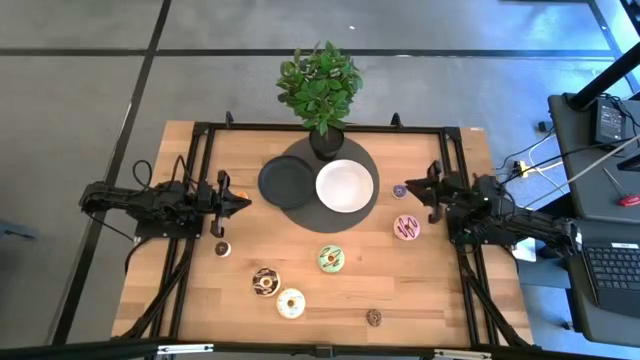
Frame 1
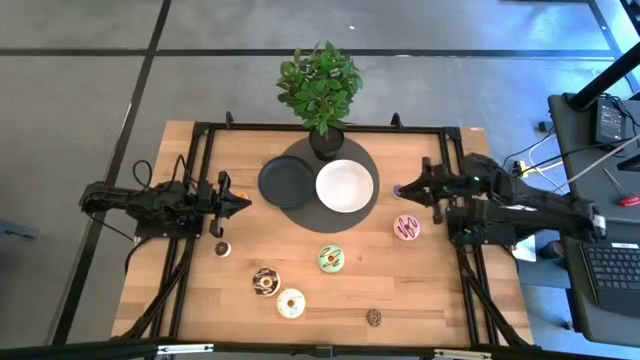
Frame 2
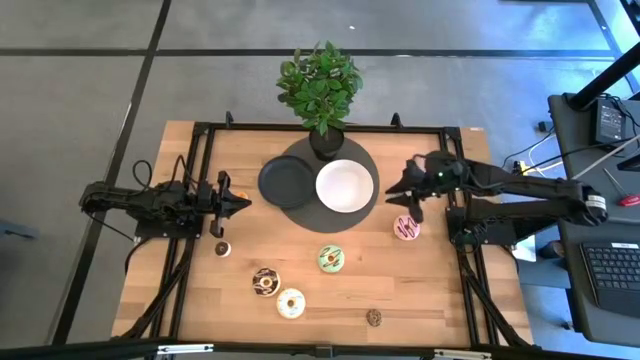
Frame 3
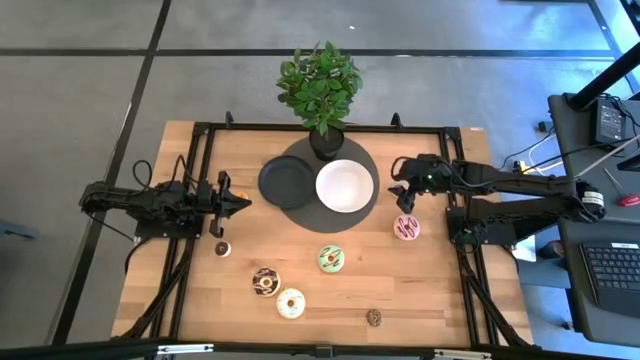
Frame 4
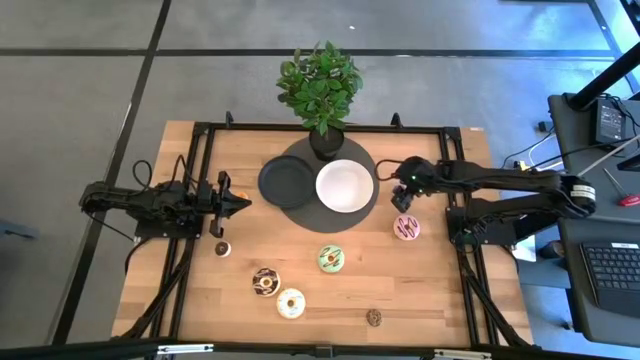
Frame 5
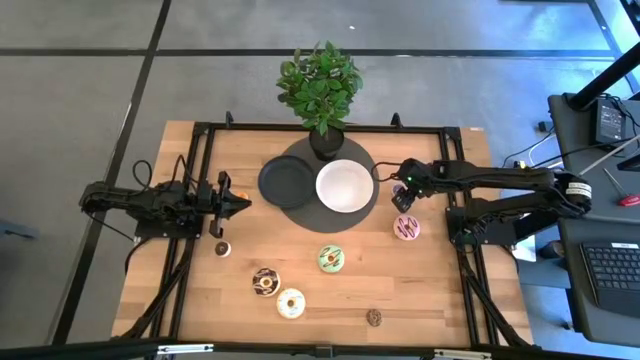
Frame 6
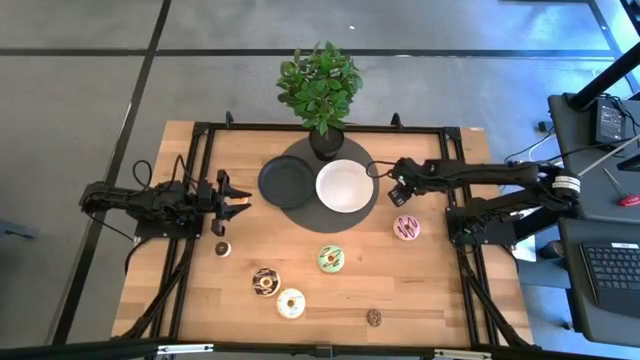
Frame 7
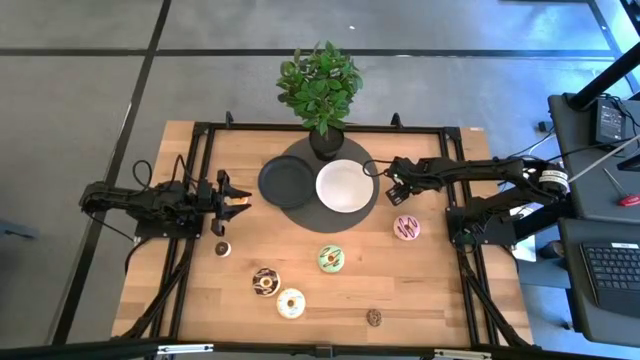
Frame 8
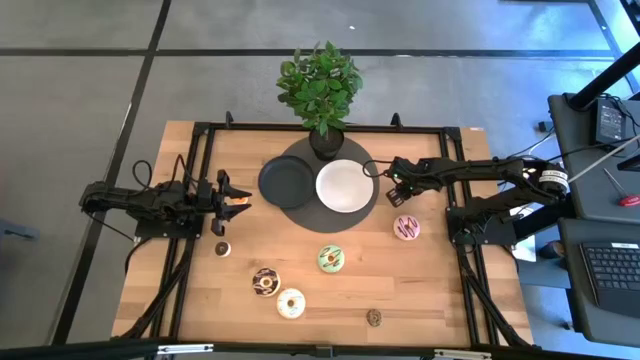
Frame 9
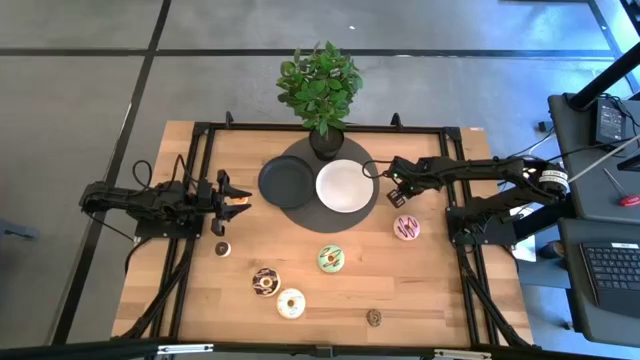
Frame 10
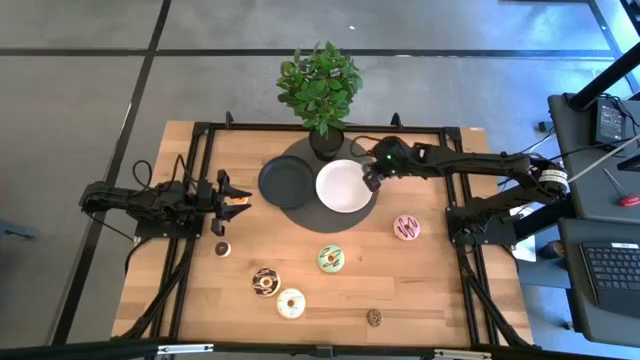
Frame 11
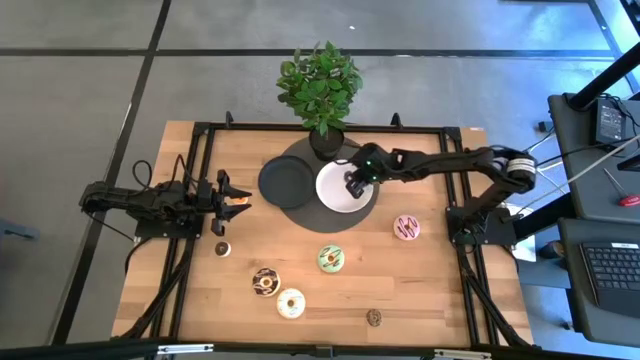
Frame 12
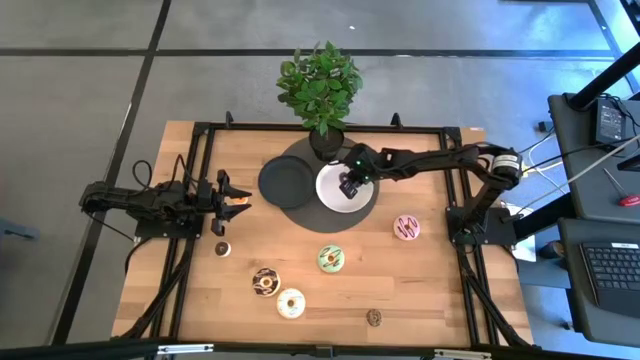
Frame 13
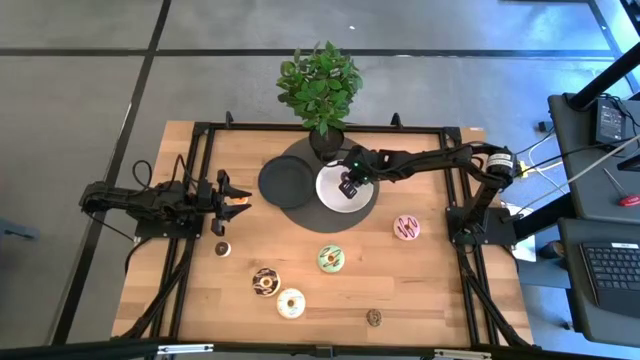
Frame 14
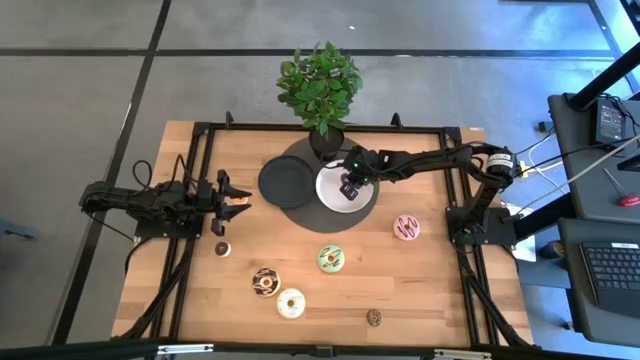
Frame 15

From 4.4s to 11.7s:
Task: Pick & Place donuts
Put the small blue donut on the white plate

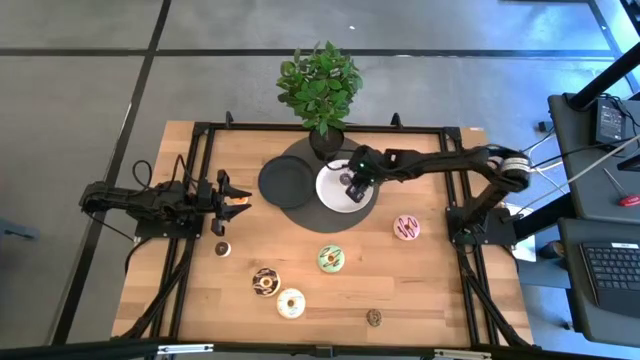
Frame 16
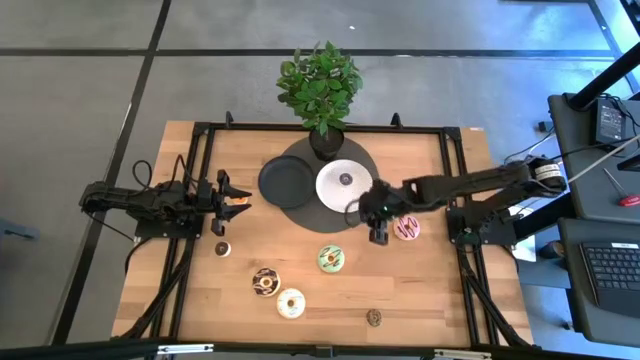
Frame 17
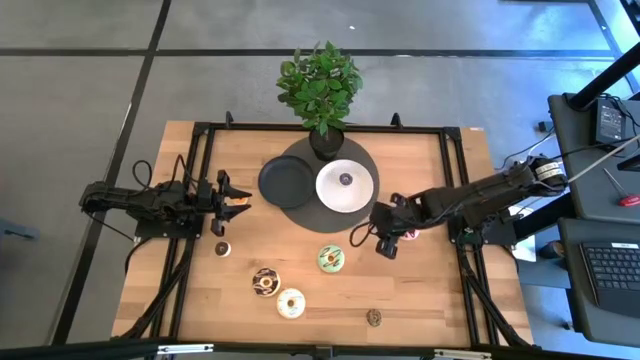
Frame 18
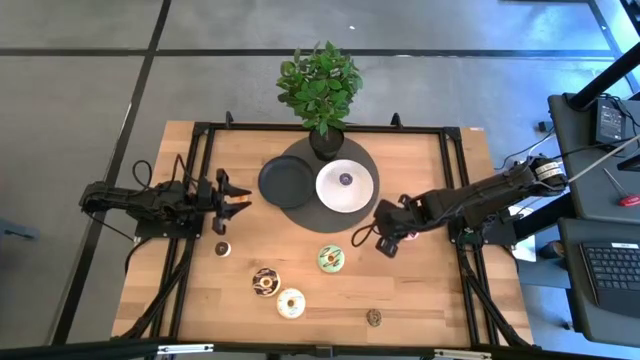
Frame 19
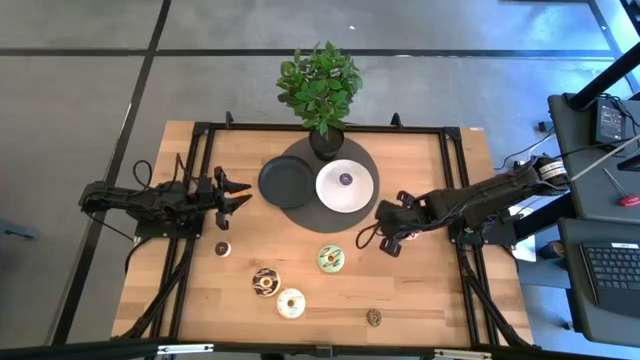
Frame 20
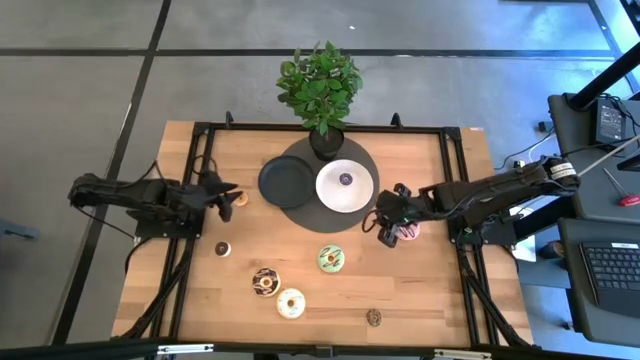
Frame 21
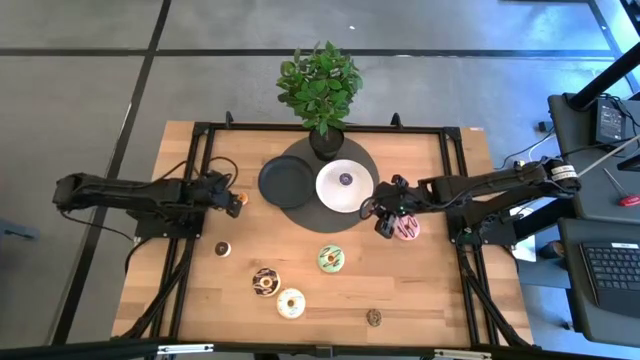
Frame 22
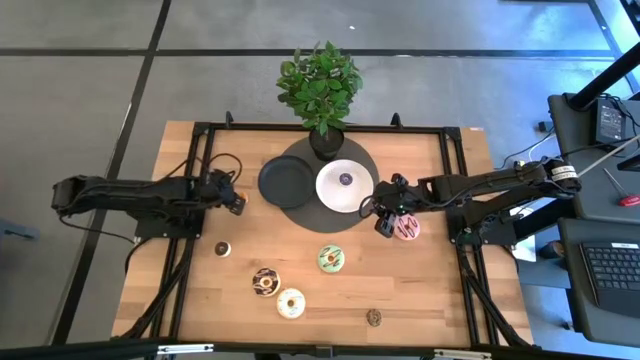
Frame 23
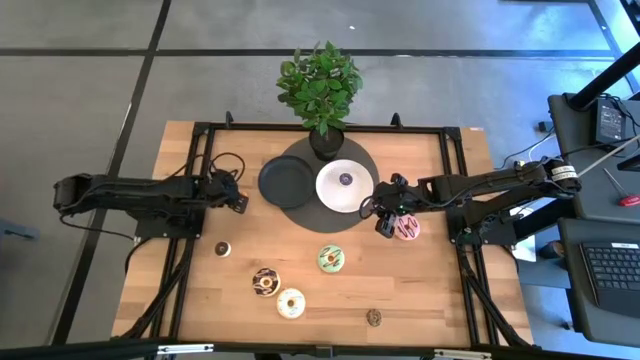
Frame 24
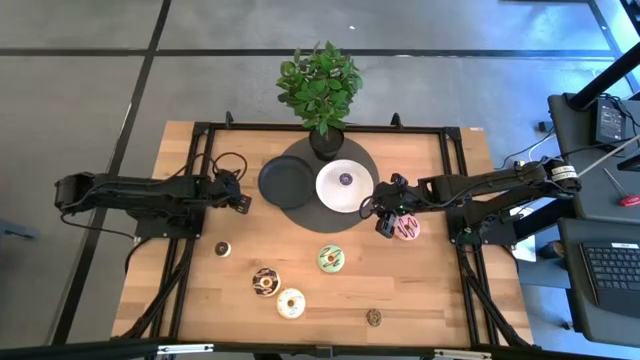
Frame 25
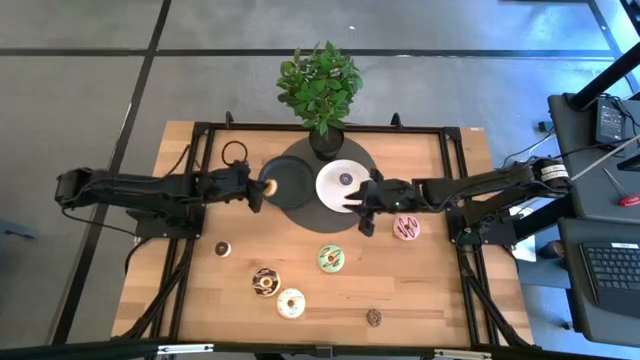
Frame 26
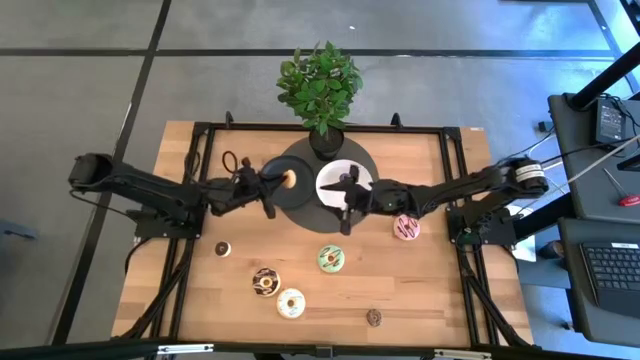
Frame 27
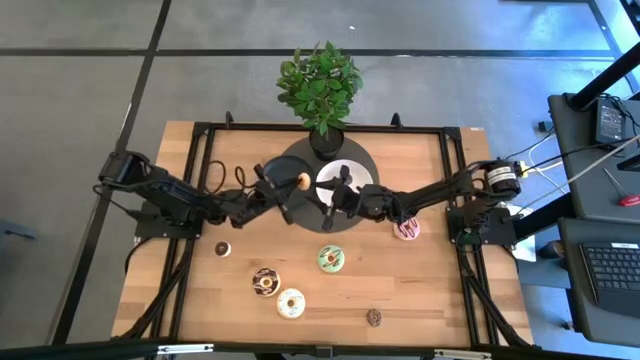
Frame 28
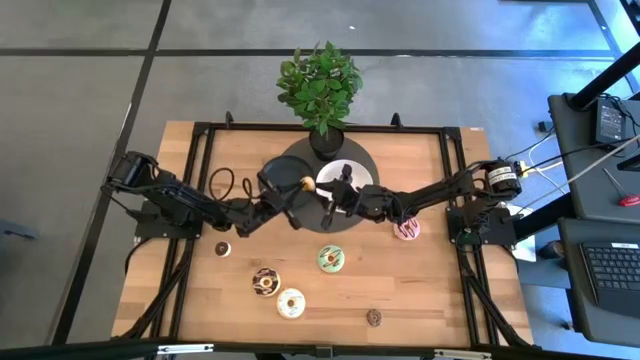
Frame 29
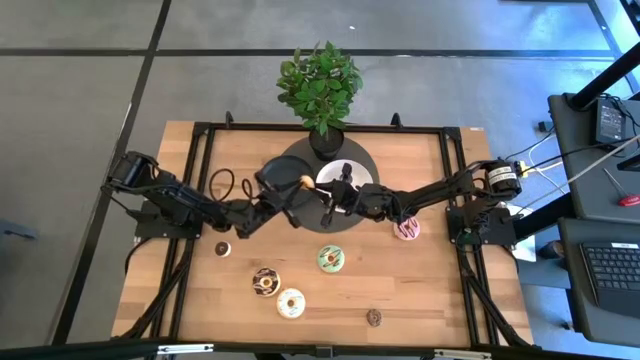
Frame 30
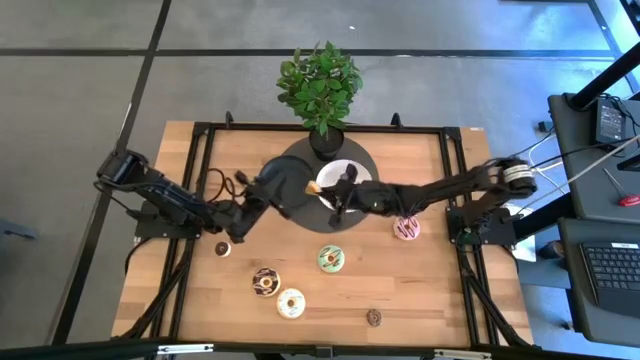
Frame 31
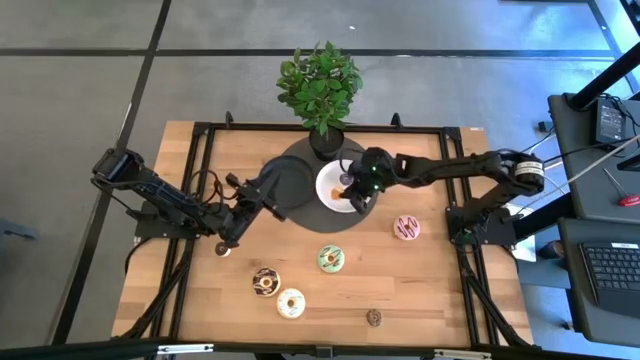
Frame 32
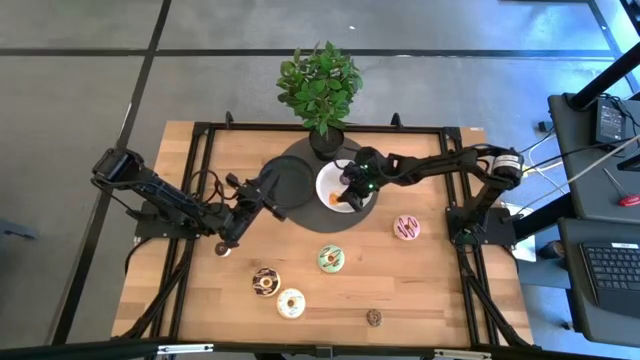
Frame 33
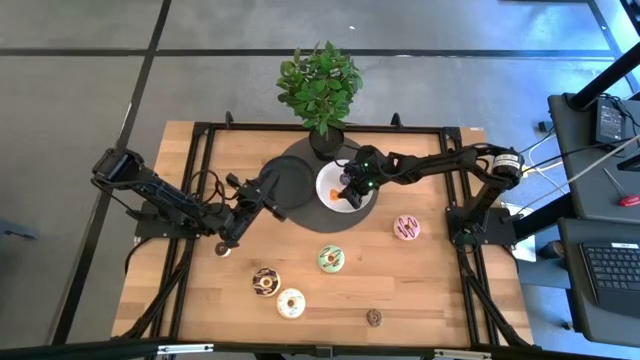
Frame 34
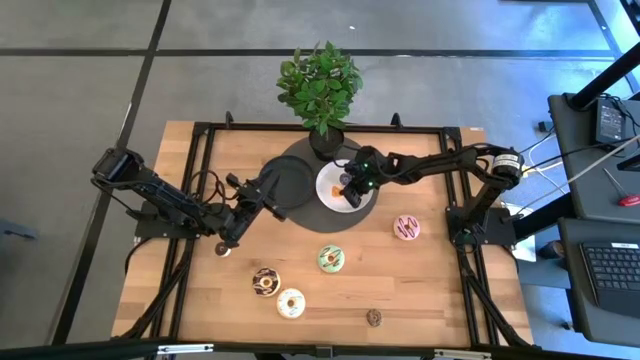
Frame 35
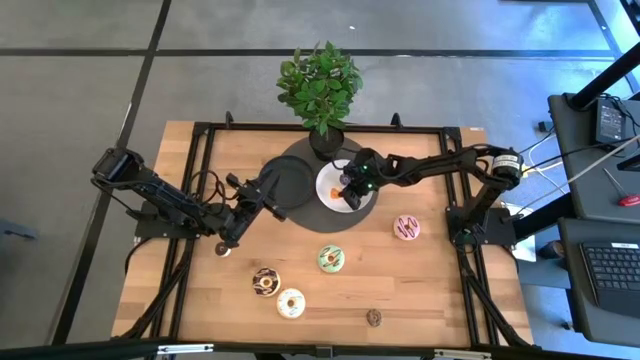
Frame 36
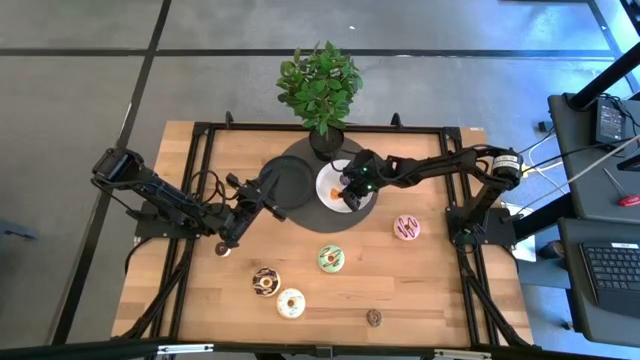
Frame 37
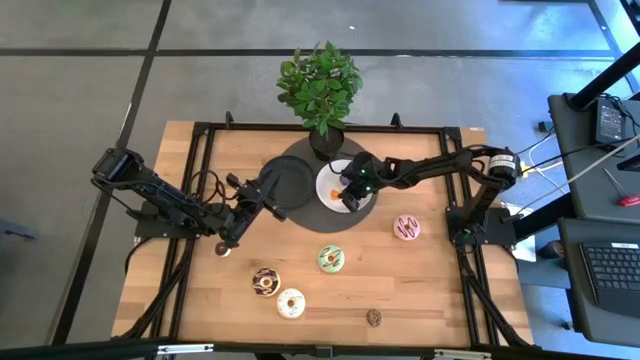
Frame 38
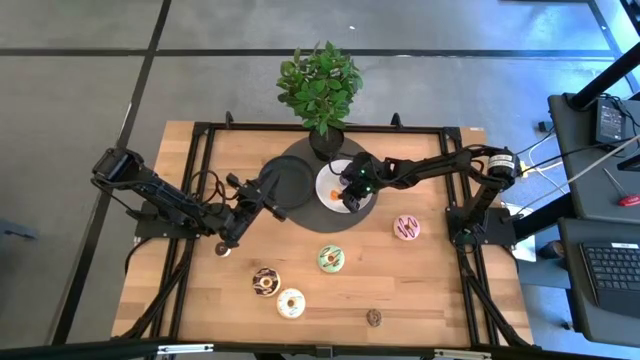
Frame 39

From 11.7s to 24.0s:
Put the small yellow donut on the white plate

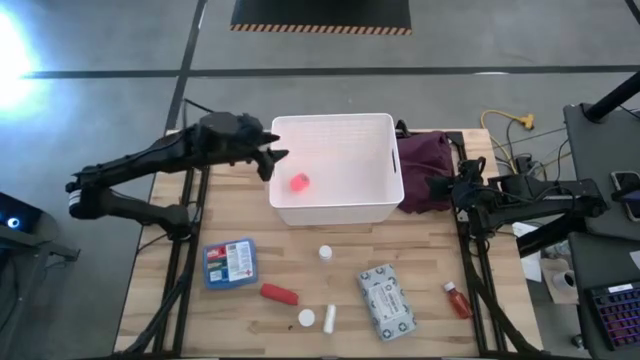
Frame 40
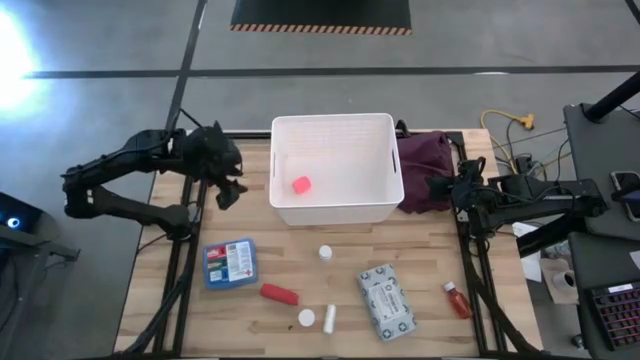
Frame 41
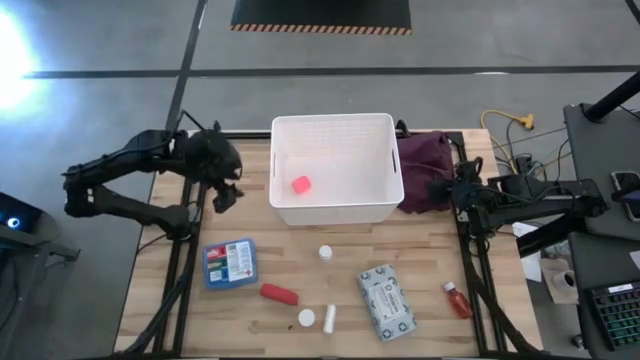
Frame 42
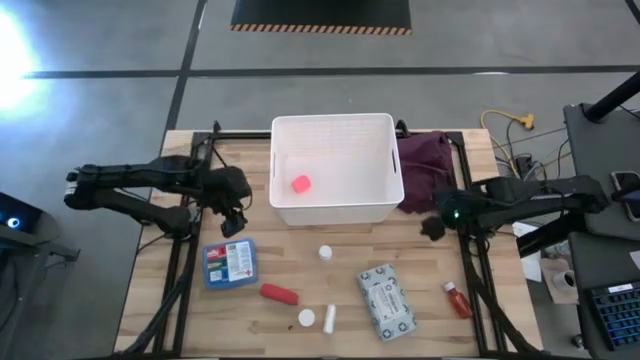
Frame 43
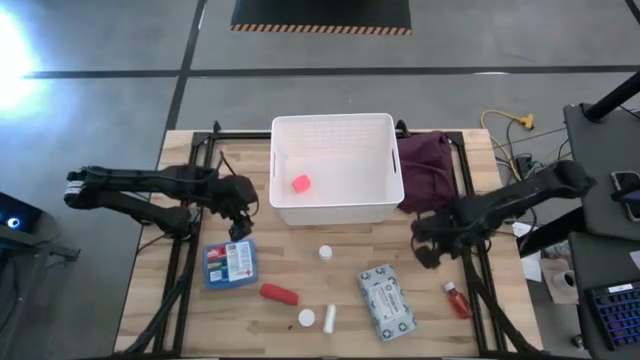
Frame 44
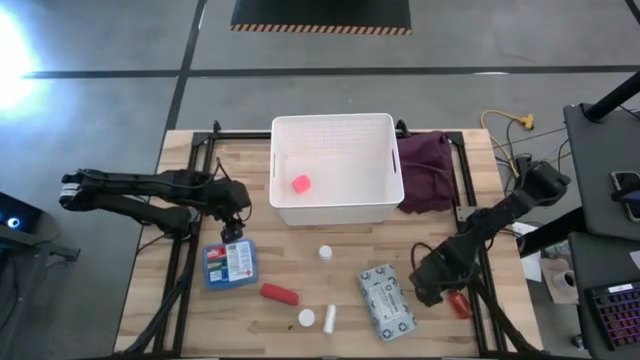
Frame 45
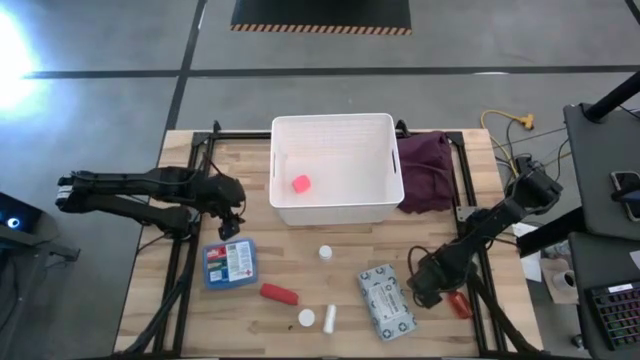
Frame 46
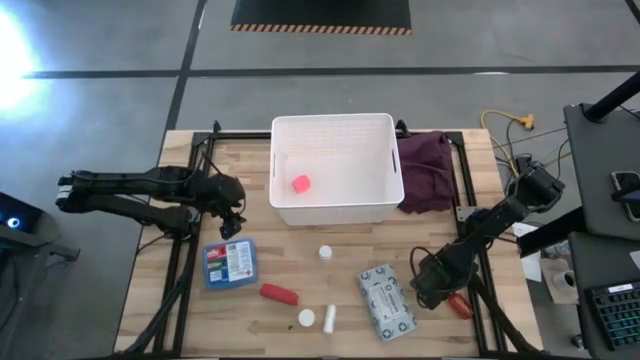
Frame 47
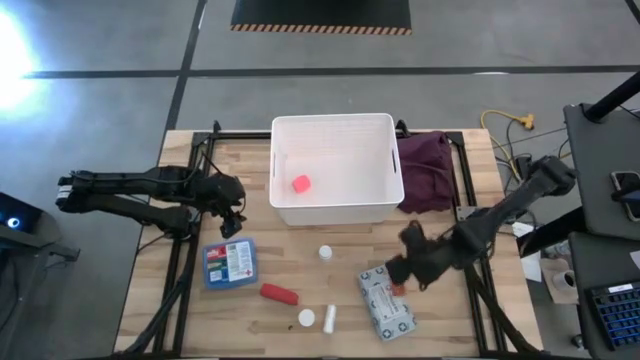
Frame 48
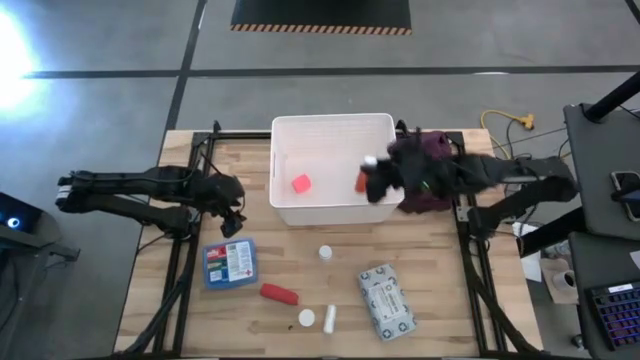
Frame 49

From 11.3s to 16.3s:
Task: Pick & place medical supplies in basket/bin
Put the brown medicine bottle into the white bin
